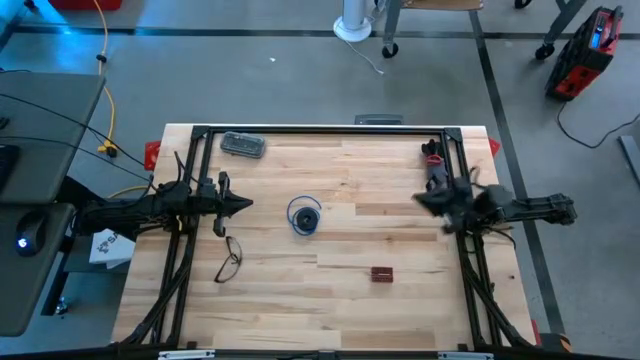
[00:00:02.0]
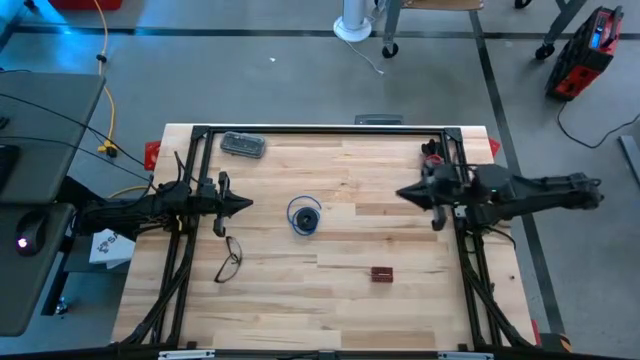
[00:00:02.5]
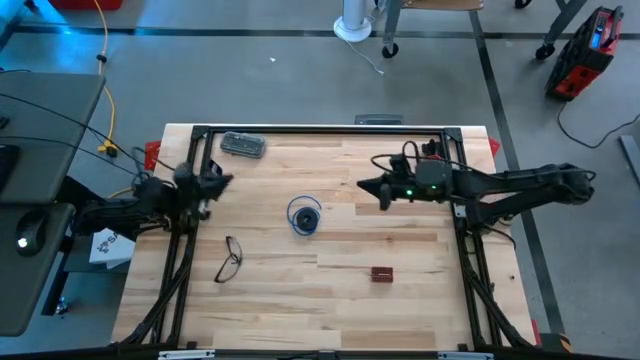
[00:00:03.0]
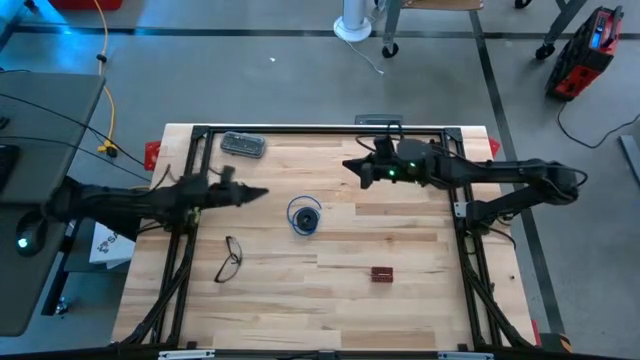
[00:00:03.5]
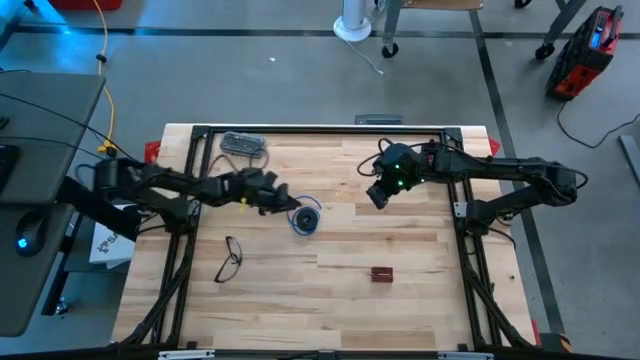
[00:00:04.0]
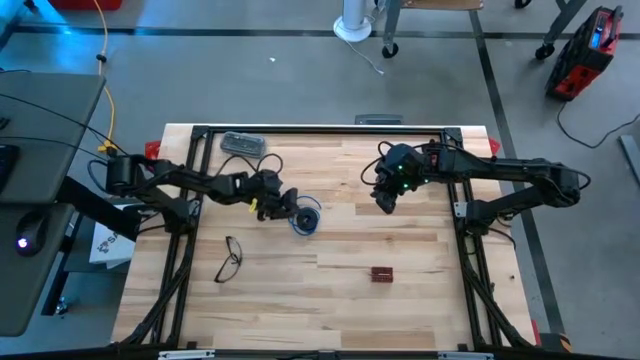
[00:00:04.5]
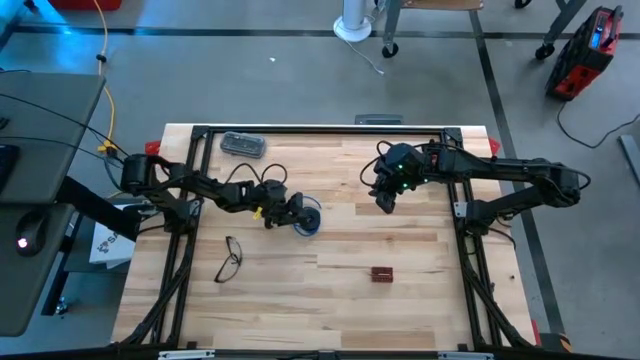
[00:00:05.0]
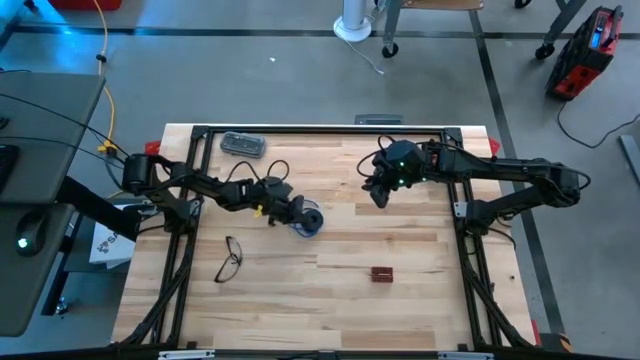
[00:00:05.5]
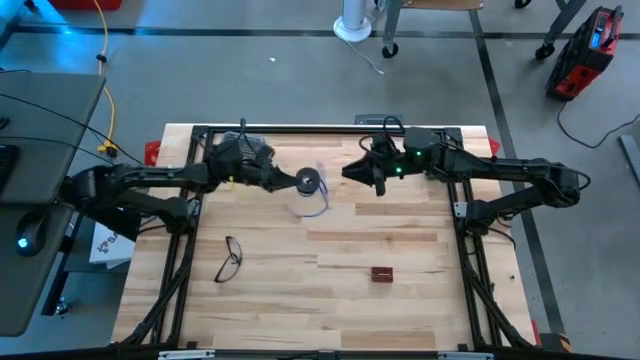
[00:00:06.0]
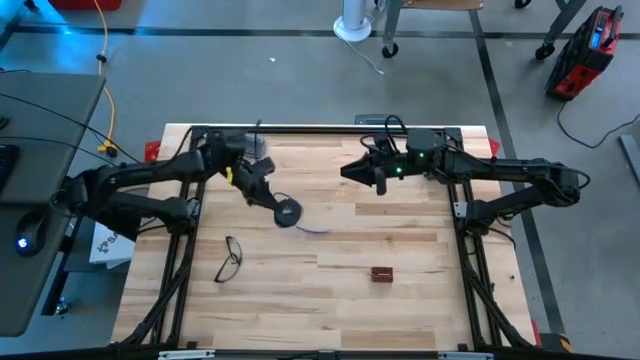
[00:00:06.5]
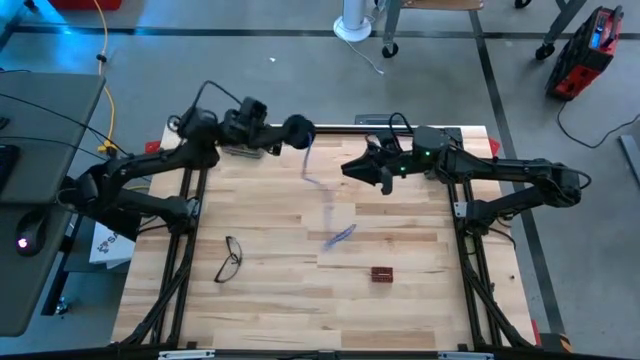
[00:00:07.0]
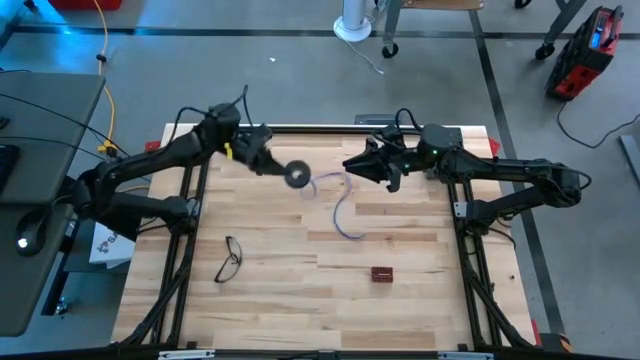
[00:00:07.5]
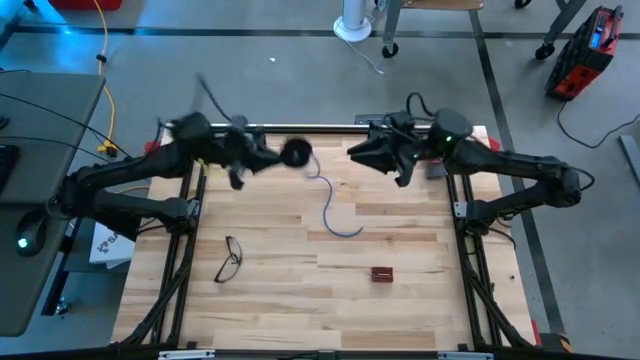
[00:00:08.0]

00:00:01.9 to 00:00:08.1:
Task: Coil cords
Uncoil the blue wire onto the spool

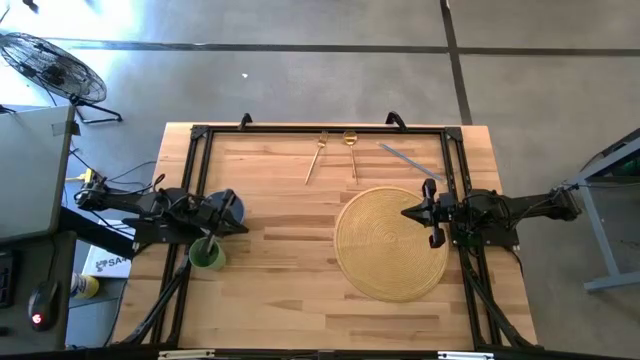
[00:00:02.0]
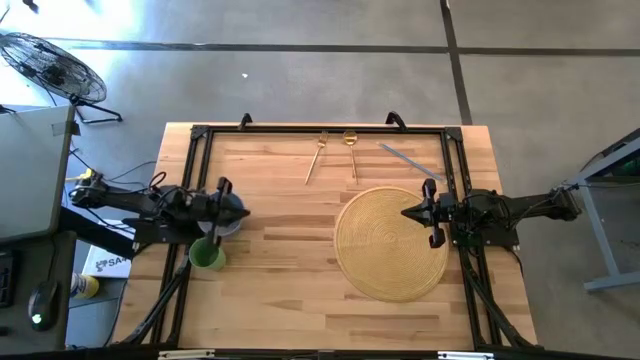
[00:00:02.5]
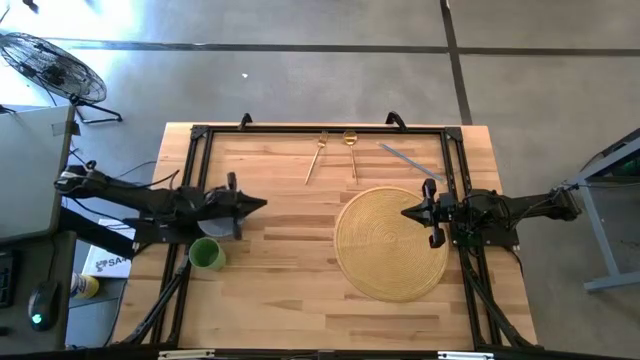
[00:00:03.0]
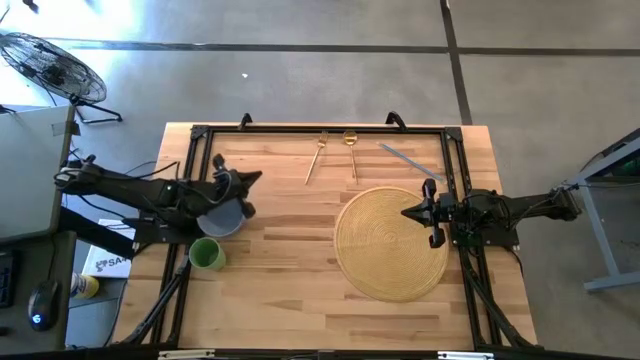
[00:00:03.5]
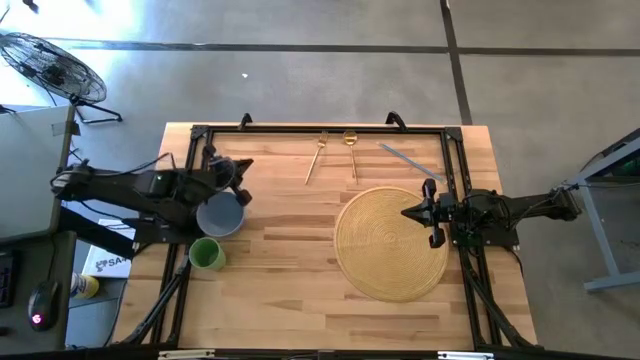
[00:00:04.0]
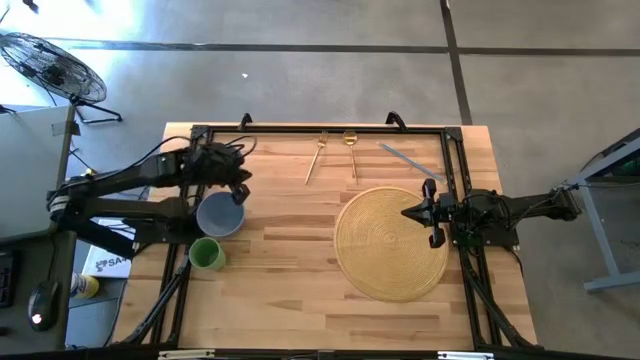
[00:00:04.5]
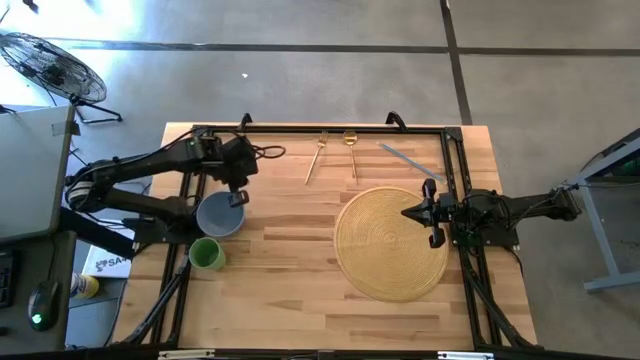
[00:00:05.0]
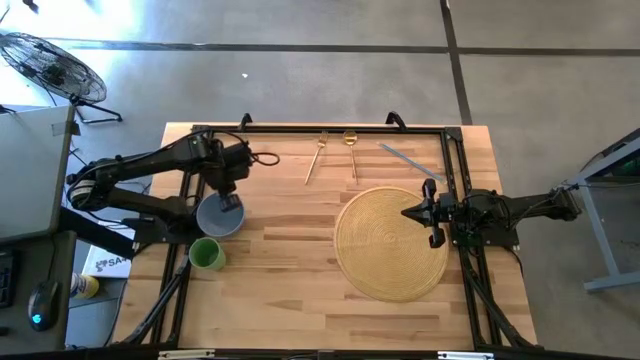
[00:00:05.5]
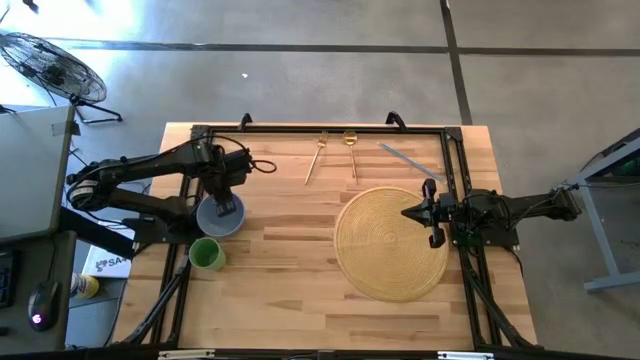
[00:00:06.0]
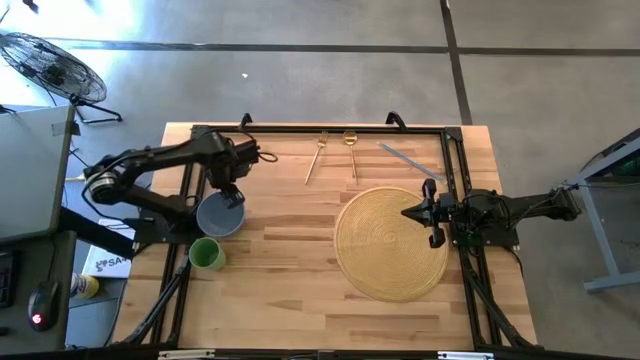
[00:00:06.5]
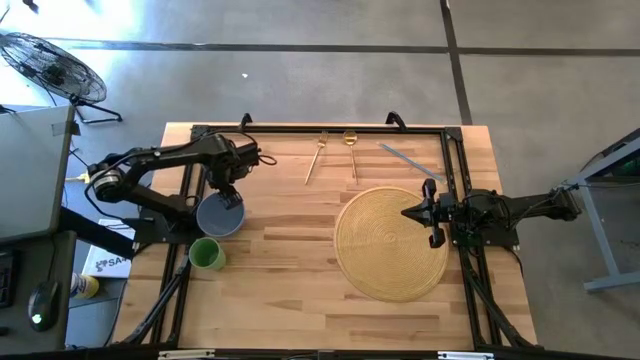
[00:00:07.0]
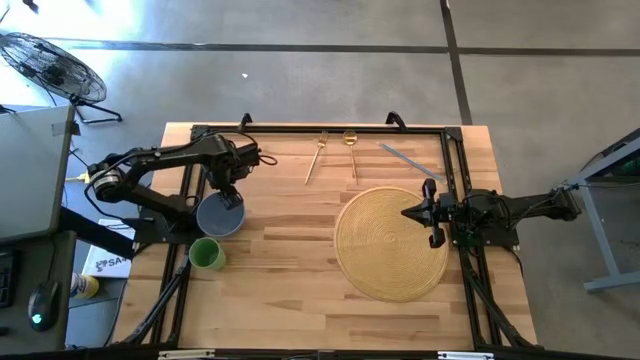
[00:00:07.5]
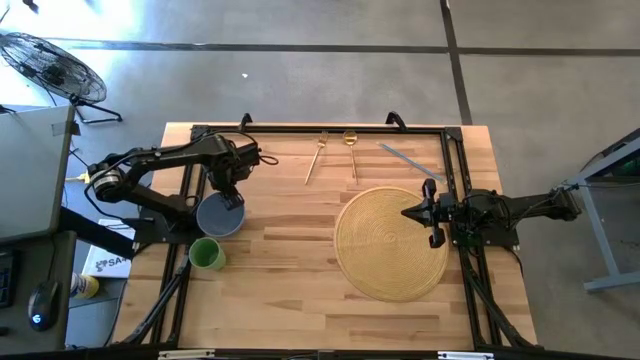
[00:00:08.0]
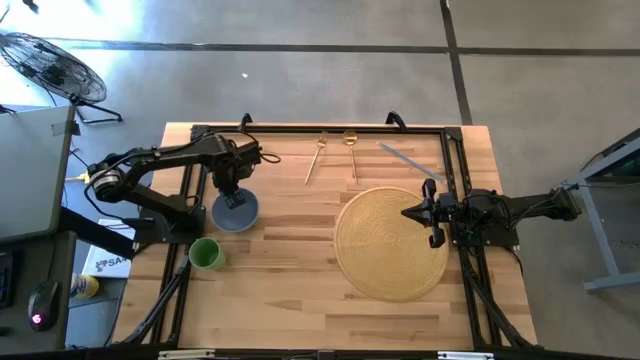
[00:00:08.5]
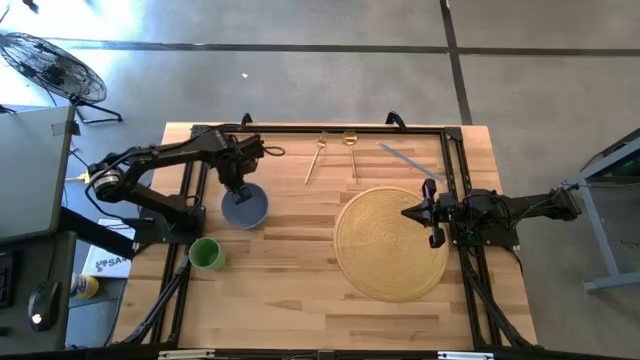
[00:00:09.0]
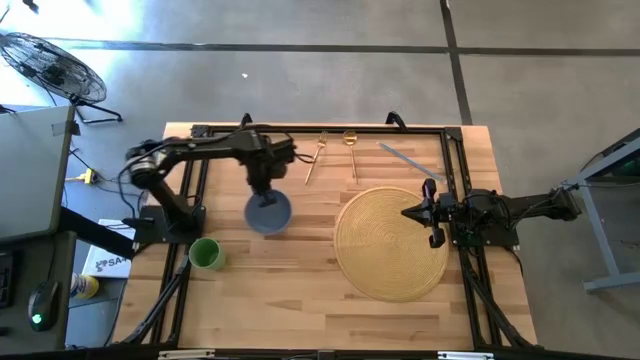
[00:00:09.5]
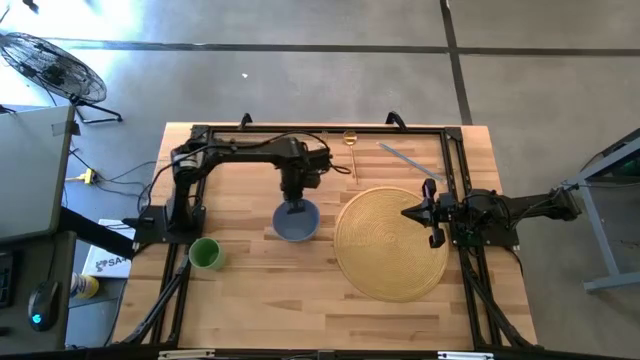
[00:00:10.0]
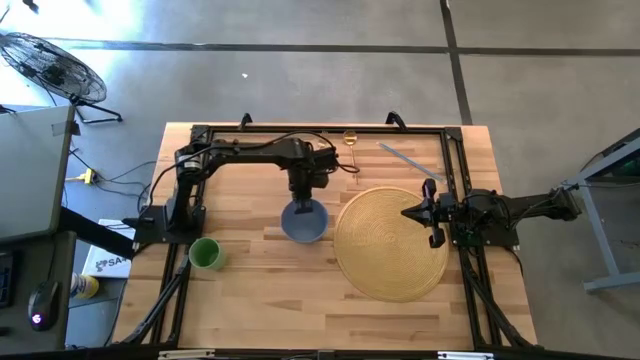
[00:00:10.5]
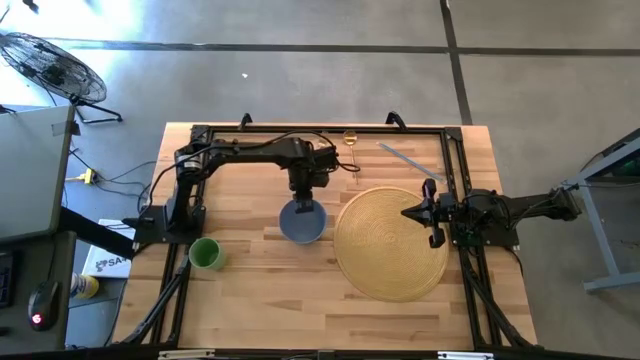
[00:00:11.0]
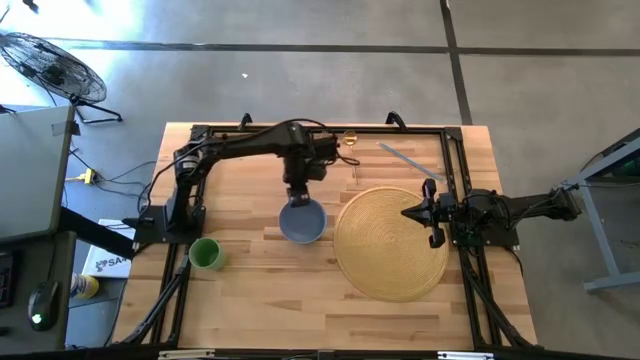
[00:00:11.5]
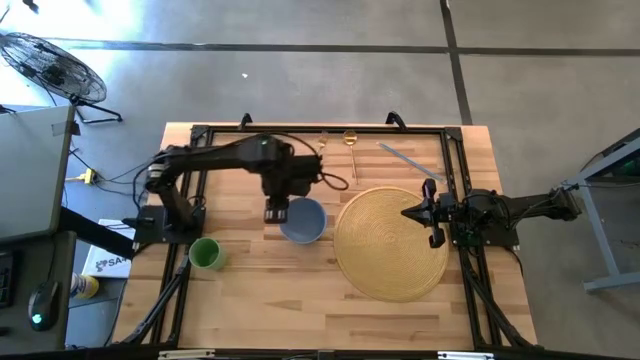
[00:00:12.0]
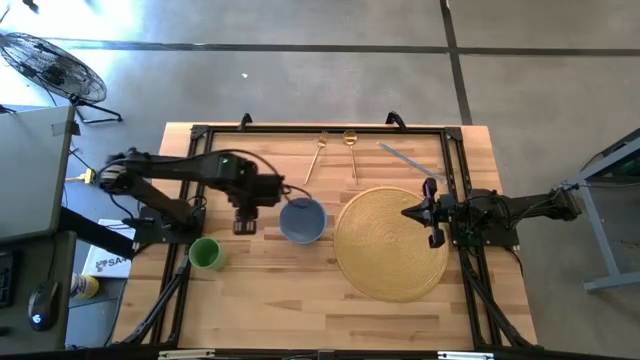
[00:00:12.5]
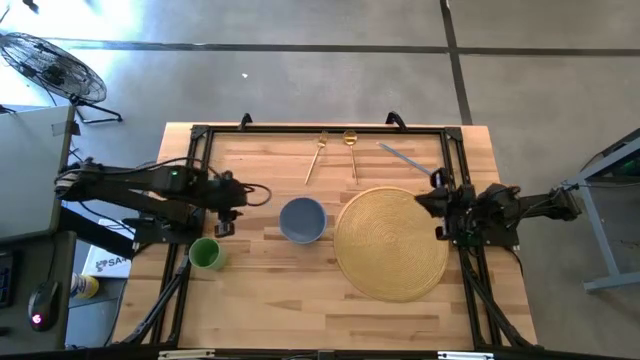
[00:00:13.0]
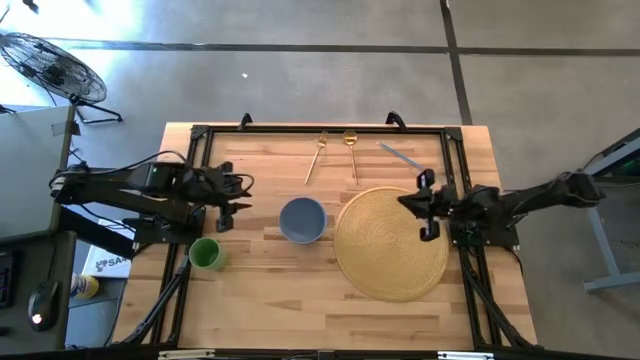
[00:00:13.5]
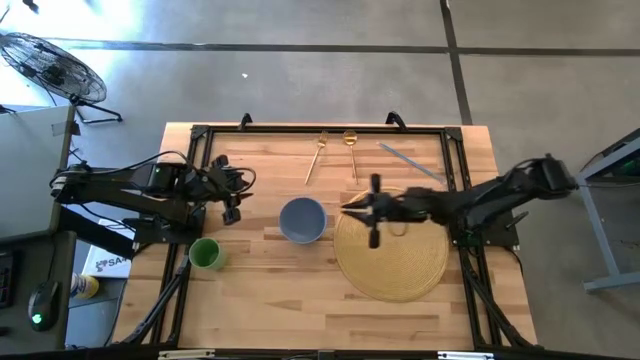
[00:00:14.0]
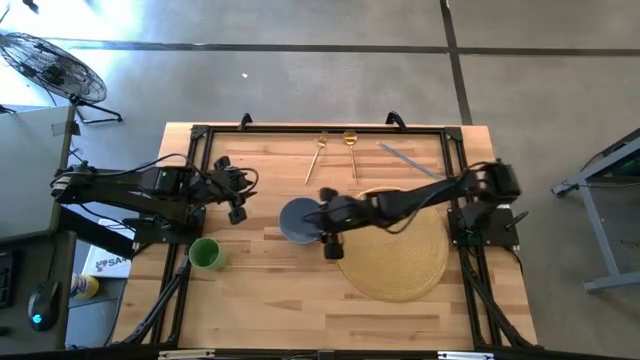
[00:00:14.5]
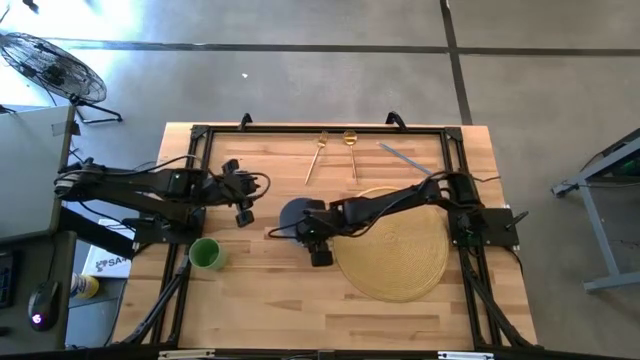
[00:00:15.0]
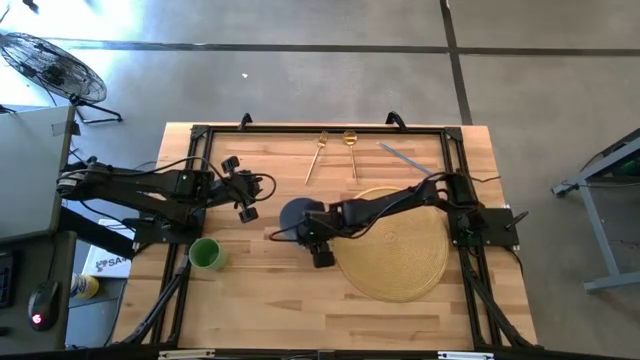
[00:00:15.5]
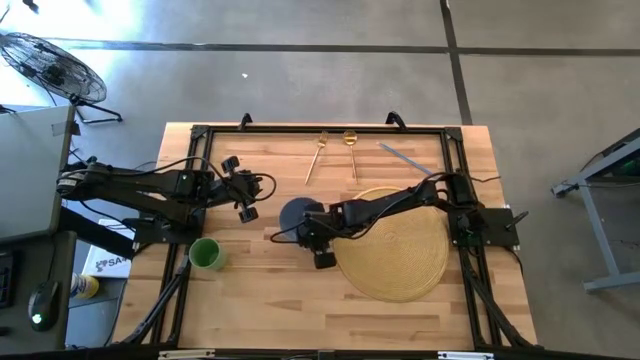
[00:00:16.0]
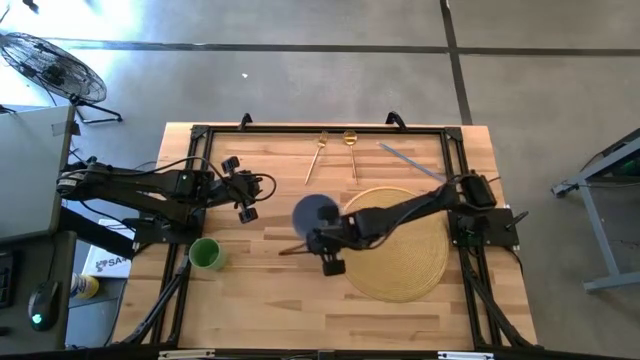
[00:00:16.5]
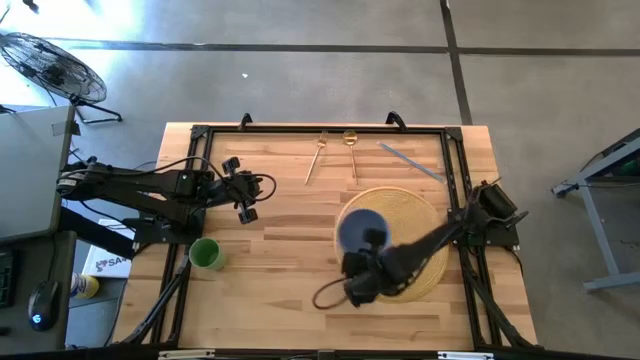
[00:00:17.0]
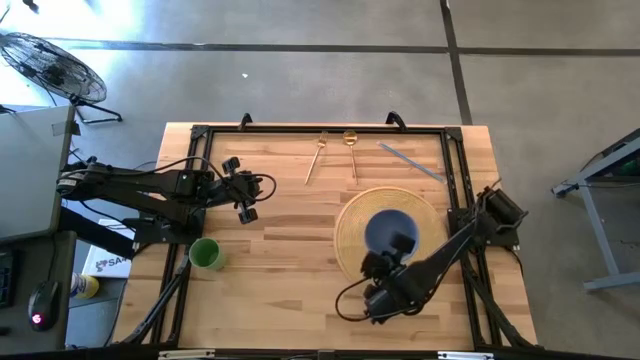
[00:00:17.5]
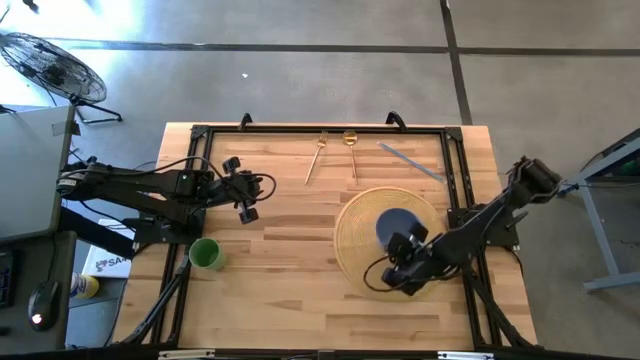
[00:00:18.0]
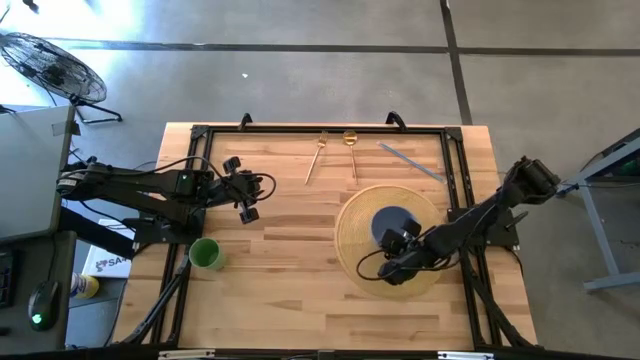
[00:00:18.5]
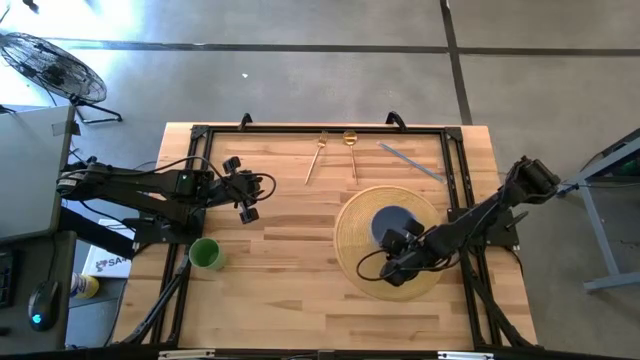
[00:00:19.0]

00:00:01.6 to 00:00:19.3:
Task: Pick & Place Utensil
Put the blue bowl on the center of the brown table mat
